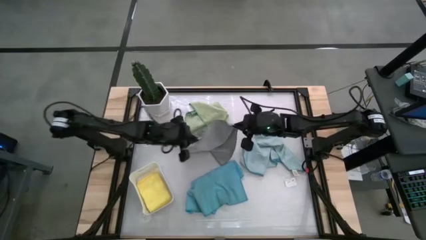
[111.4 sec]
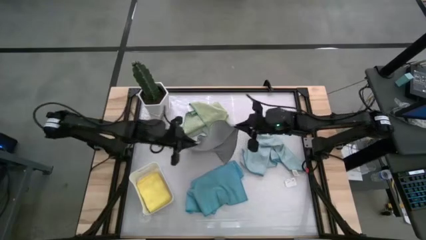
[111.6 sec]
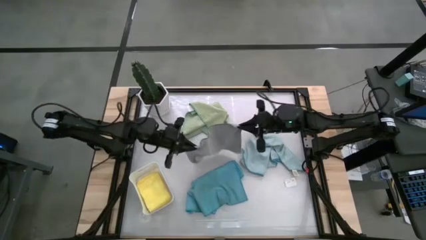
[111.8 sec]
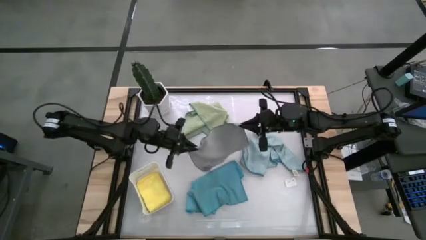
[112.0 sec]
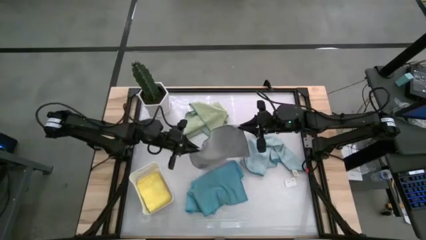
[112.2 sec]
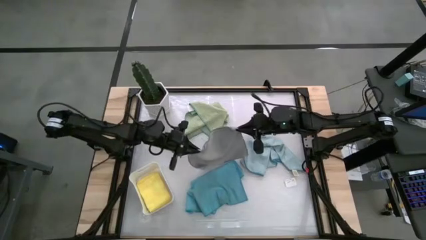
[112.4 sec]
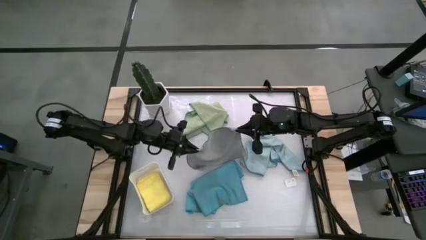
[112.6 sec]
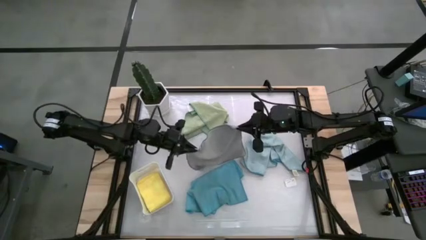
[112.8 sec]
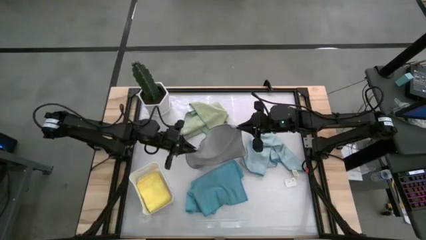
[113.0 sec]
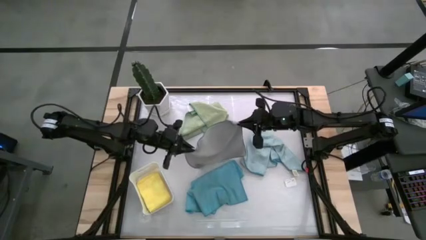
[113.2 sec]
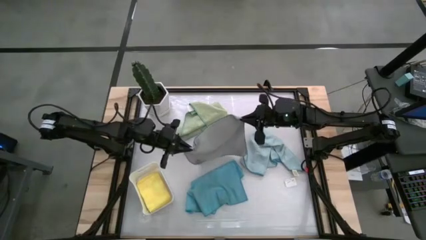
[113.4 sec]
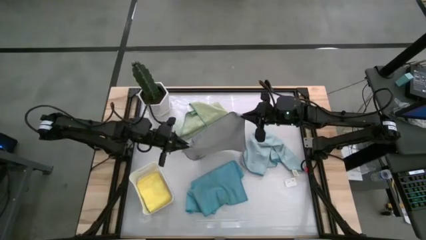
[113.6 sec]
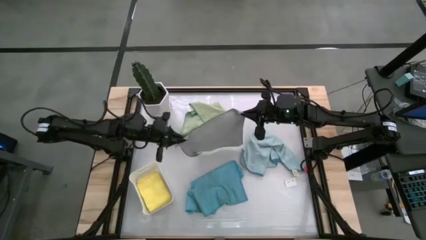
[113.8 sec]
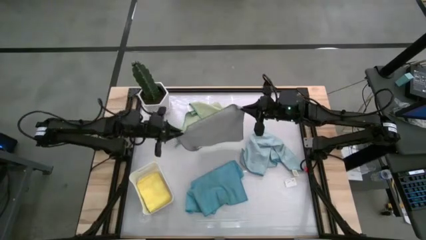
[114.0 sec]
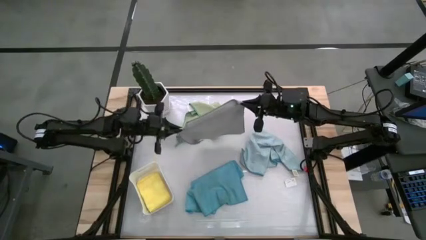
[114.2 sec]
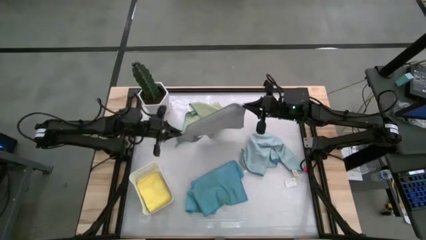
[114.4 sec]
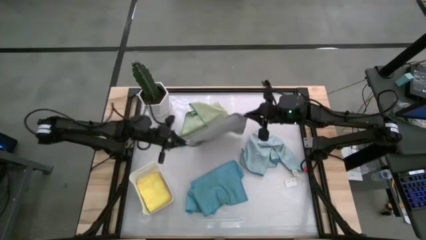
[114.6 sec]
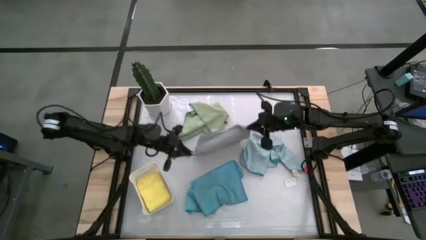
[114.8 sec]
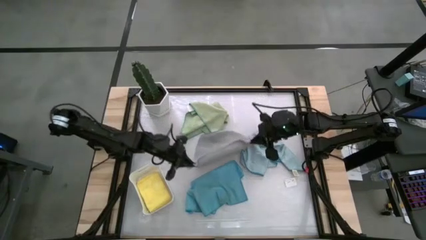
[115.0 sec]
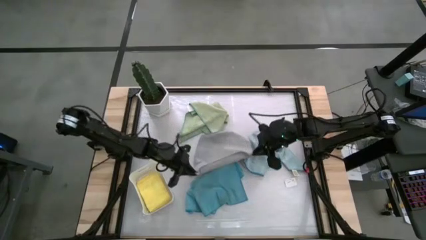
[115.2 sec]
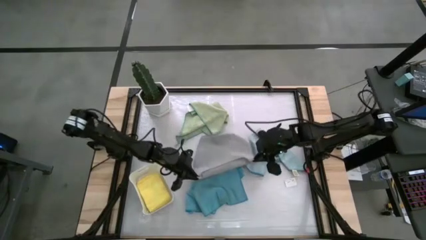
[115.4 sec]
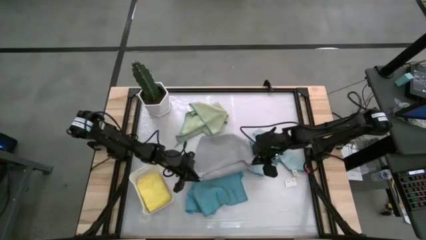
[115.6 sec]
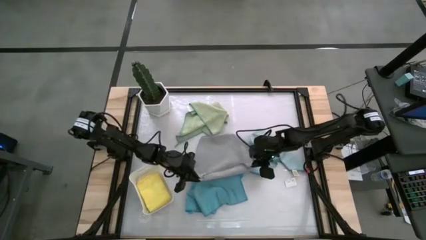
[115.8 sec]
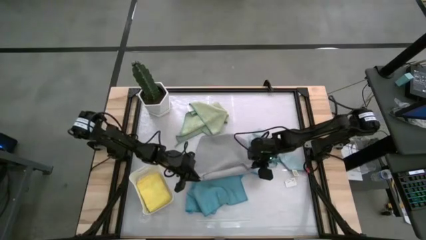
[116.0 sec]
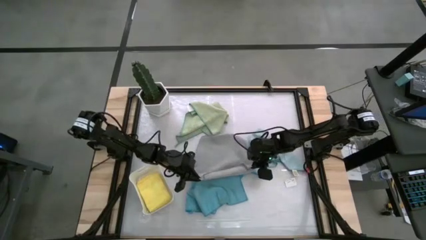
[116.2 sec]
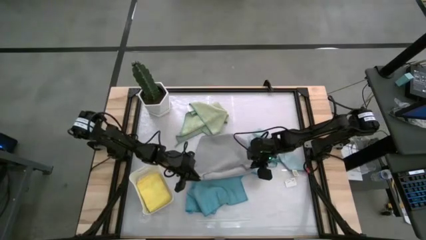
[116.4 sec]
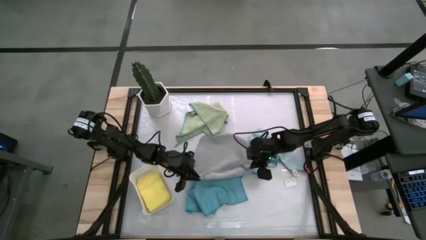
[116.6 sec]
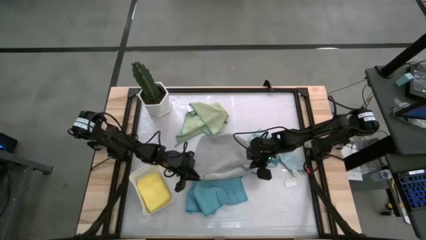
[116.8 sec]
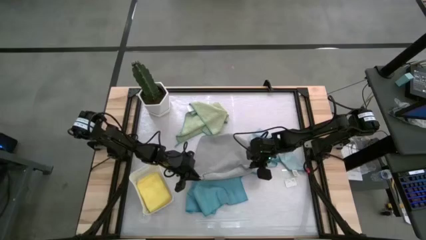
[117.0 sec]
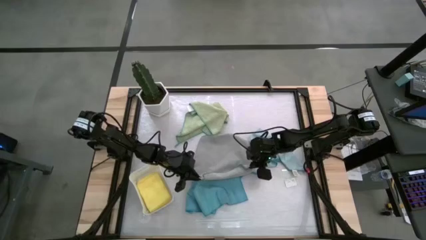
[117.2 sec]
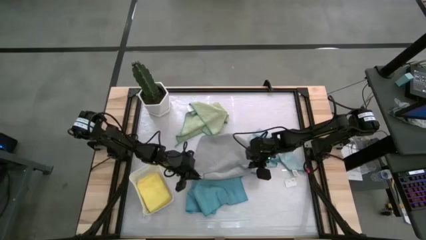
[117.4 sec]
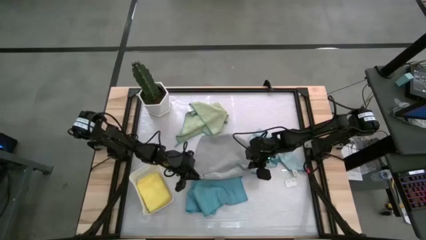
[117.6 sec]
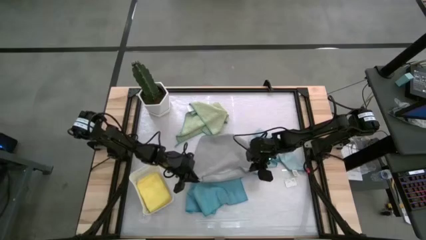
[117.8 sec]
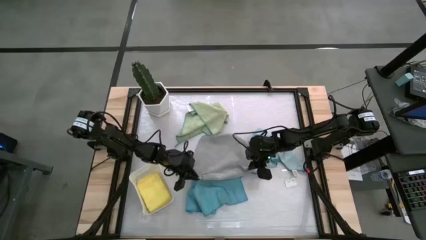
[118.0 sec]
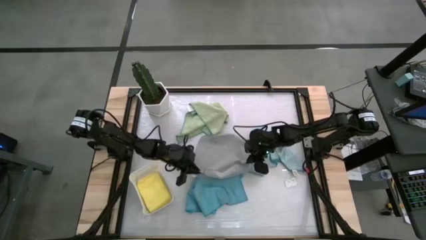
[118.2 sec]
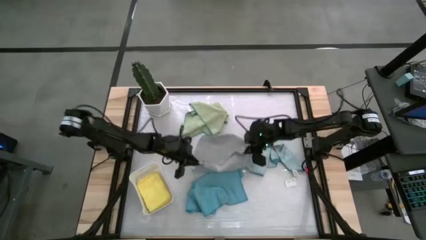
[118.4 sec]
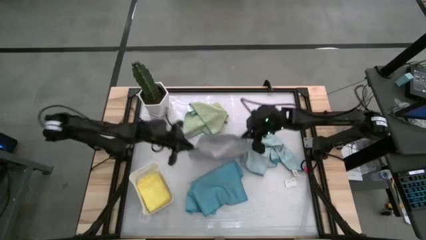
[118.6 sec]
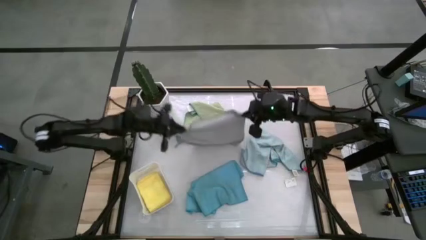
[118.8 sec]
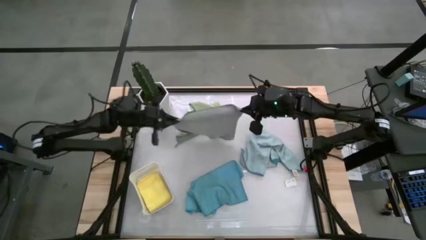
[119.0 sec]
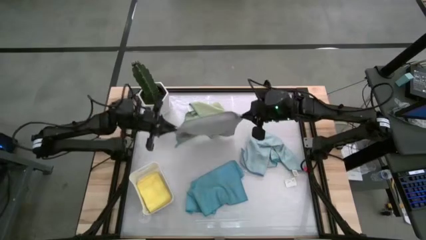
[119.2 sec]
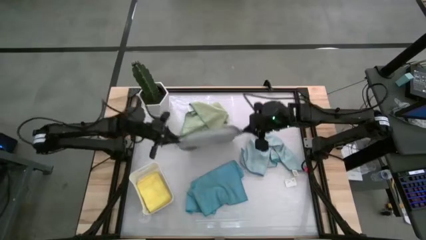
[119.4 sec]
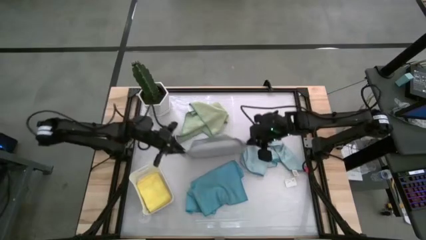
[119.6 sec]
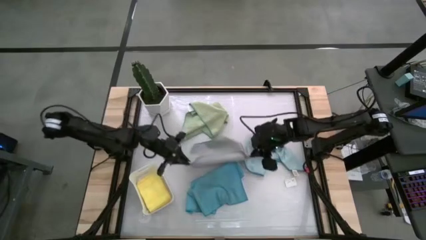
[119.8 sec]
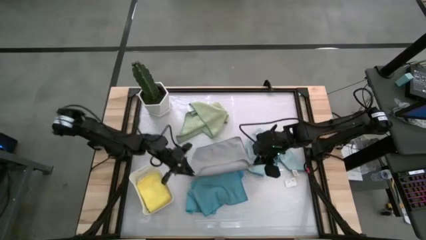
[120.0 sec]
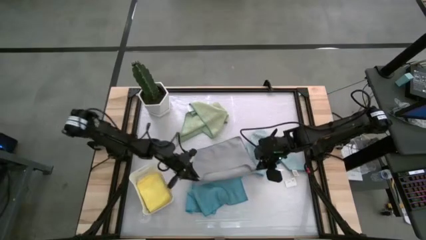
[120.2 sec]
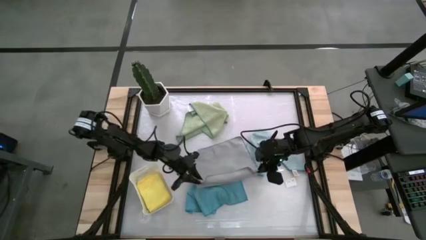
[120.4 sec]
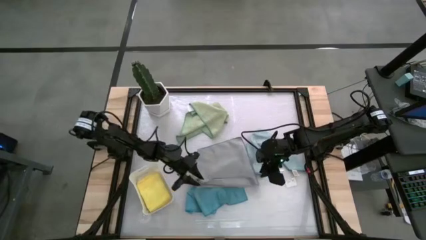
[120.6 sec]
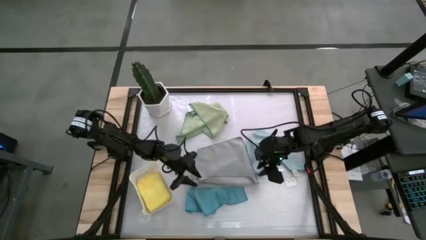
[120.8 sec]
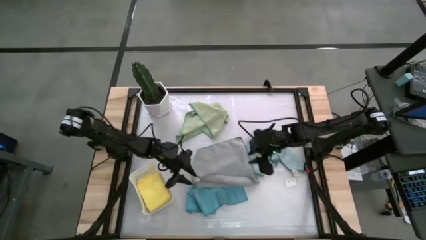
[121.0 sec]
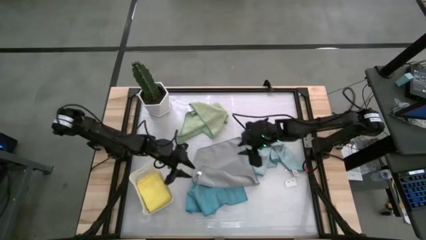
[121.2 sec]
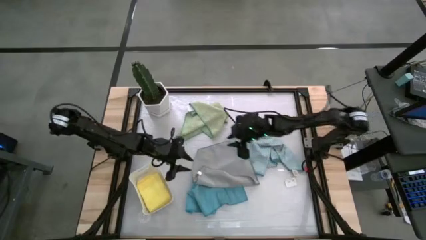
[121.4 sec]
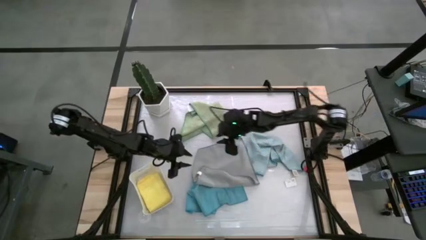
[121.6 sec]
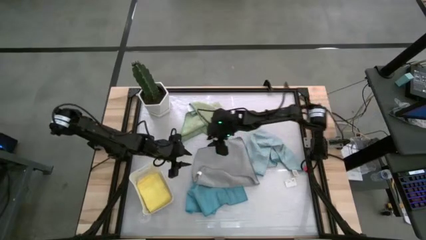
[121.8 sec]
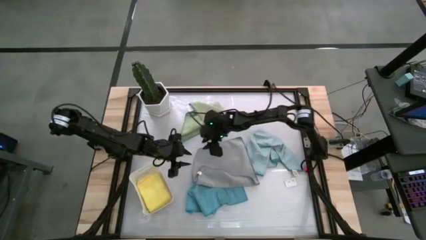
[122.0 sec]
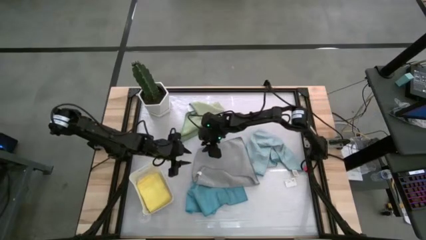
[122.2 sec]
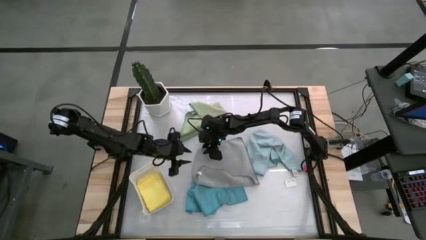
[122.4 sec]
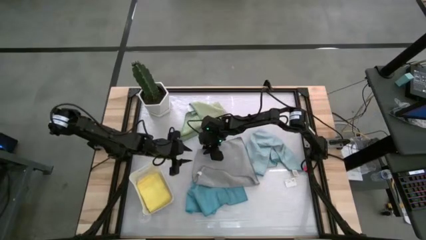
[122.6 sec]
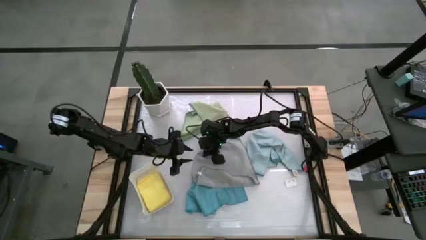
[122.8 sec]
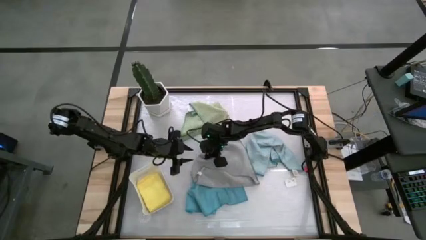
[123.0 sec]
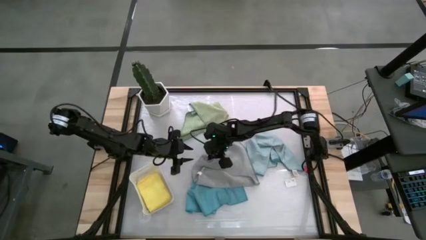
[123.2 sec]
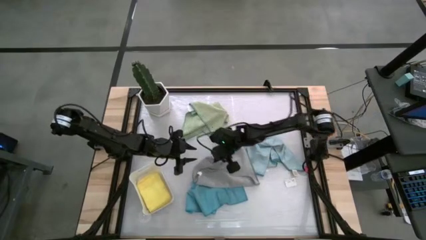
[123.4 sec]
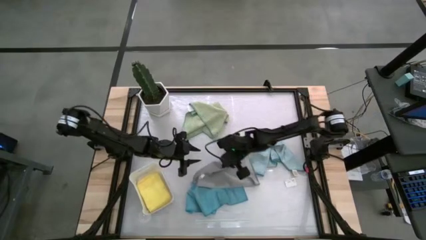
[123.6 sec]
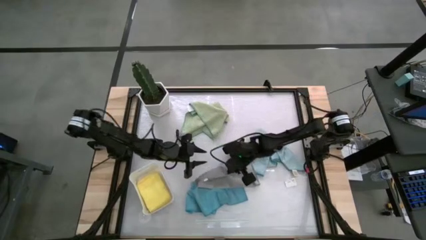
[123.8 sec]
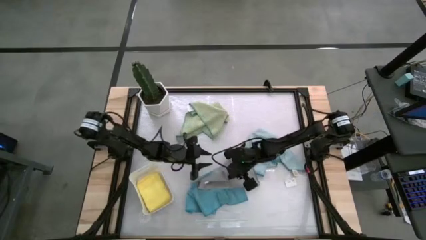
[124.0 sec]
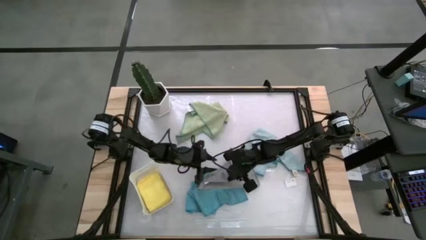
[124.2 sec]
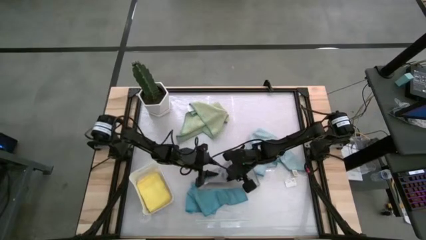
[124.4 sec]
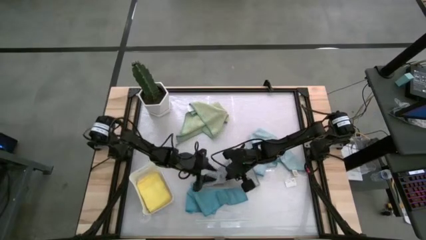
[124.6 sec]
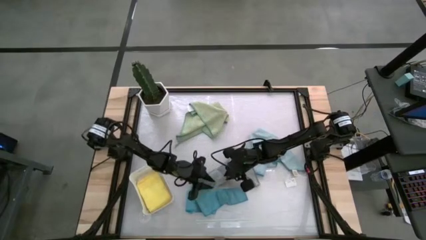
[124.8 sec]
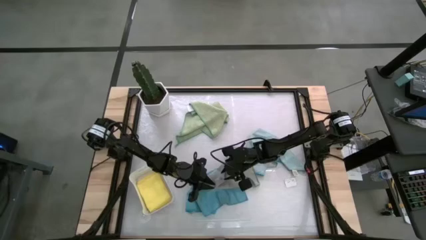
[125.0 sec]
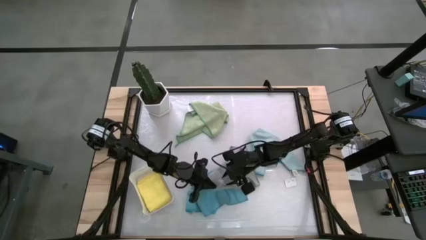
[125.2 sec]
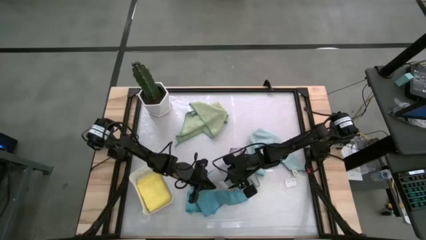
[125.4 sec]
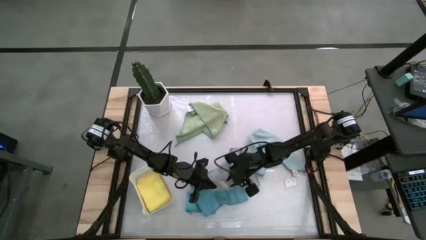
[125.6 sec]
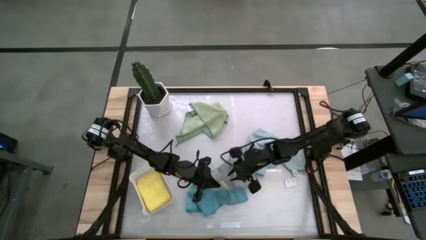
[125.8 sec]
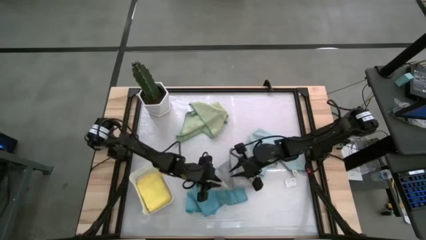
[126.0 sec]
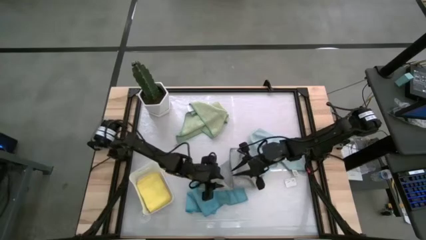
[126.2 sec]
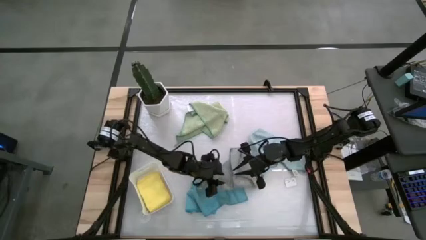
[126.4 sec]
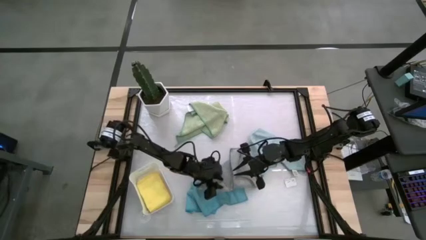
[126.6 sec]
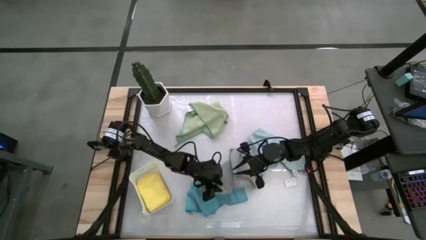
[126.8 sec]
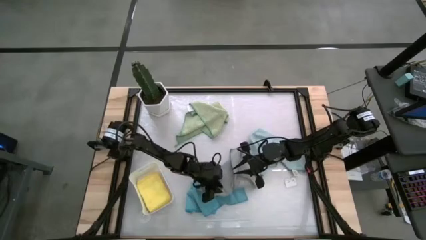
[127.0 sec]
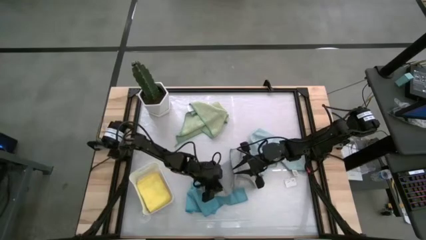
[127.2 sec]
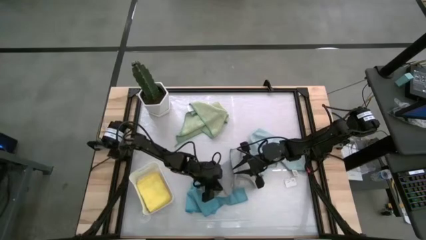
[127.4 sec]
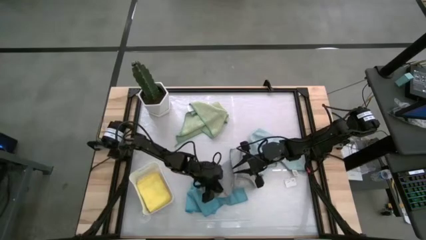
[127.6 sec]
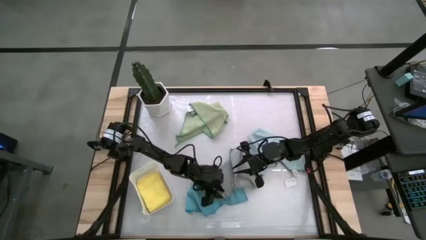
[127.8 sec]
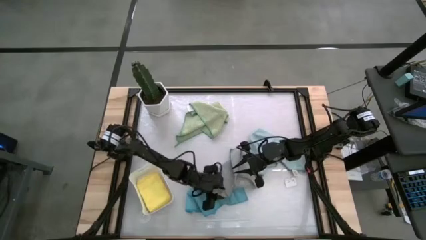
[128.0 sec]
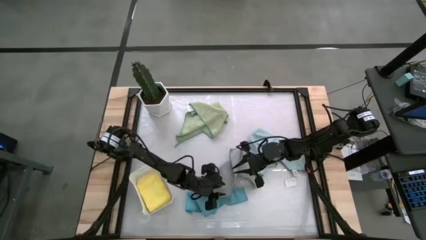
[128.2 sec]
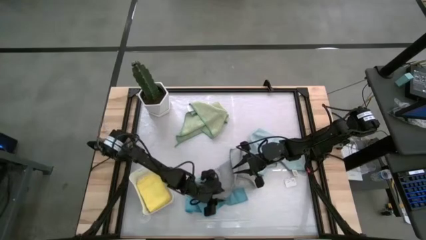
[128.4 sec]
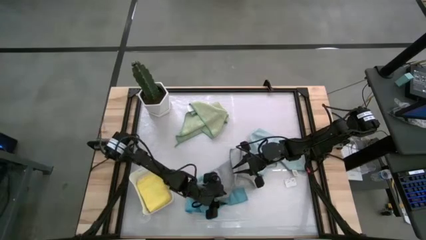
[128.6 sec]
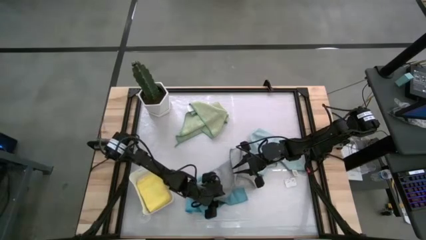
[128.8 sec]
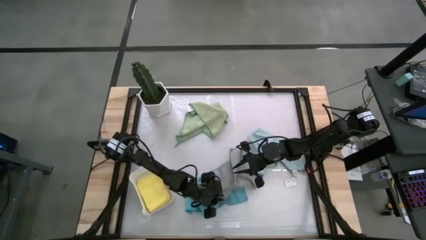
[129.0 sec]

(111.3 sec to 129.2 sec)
Task: Fold microfiber towels
Fold the gray microfiber towel
